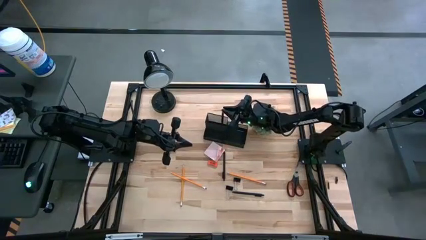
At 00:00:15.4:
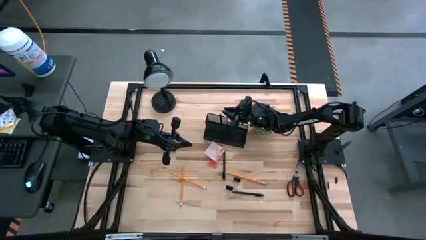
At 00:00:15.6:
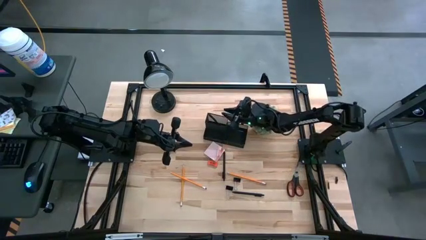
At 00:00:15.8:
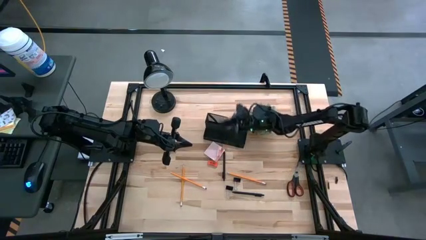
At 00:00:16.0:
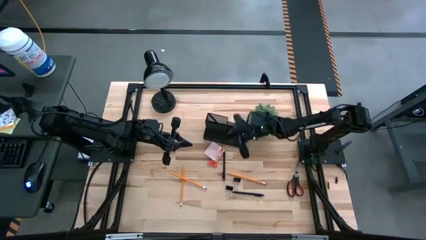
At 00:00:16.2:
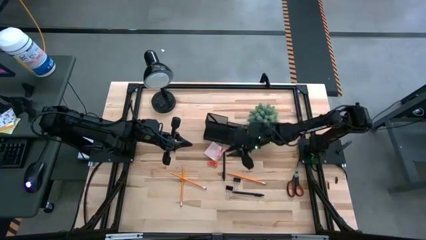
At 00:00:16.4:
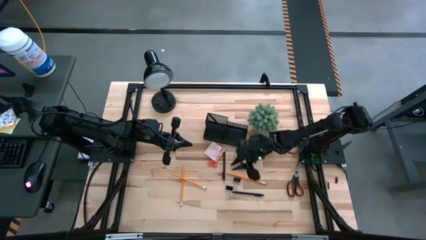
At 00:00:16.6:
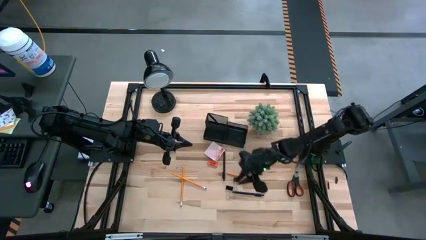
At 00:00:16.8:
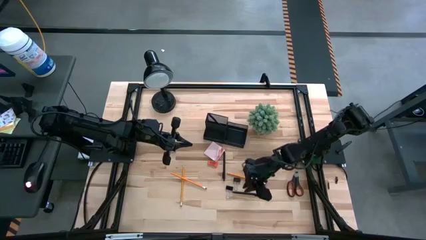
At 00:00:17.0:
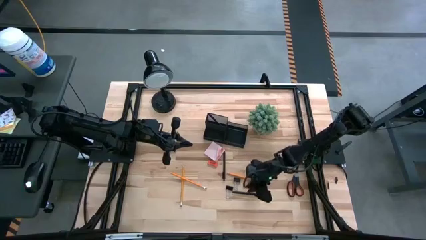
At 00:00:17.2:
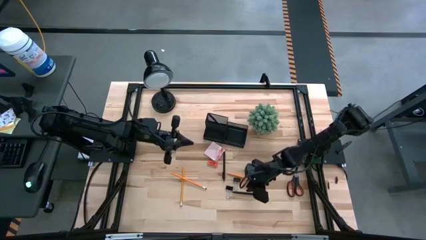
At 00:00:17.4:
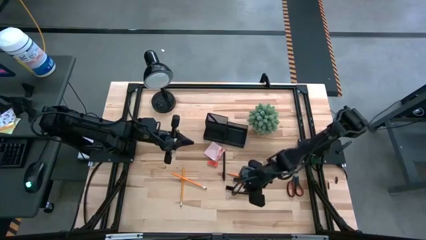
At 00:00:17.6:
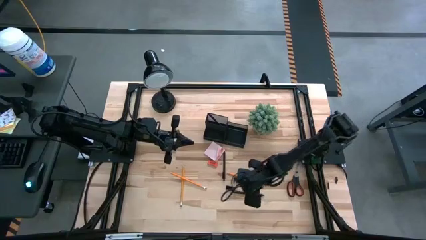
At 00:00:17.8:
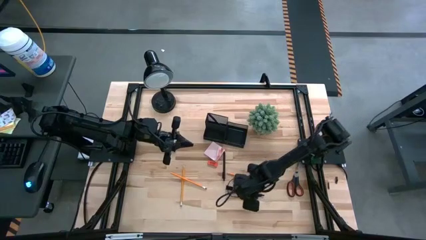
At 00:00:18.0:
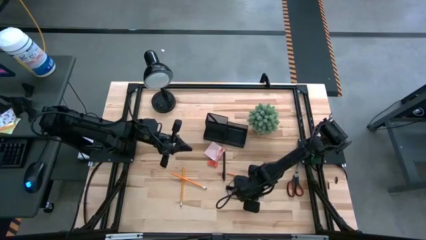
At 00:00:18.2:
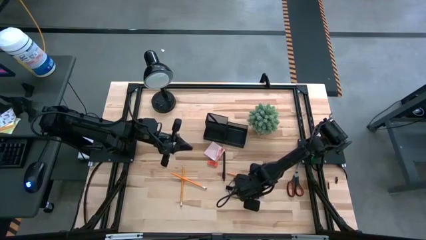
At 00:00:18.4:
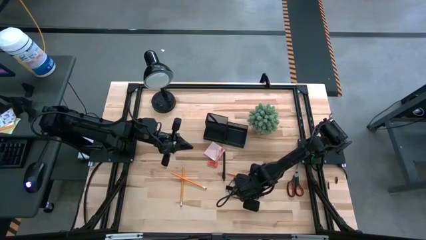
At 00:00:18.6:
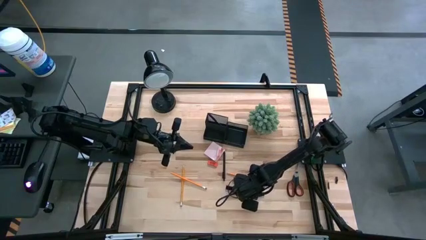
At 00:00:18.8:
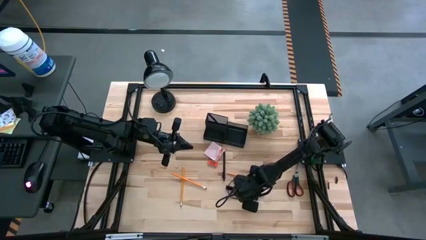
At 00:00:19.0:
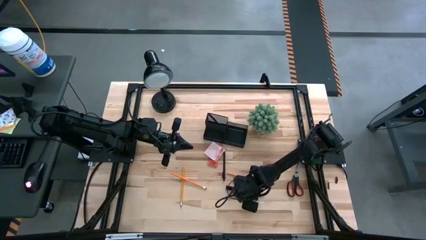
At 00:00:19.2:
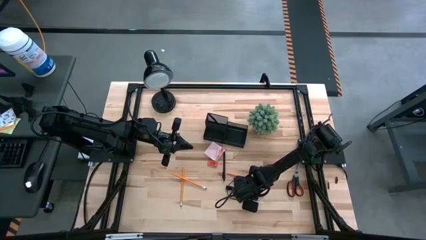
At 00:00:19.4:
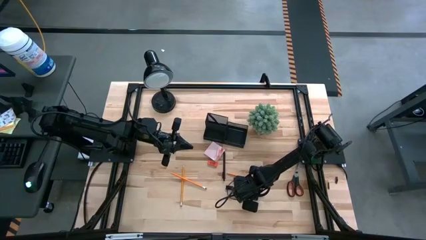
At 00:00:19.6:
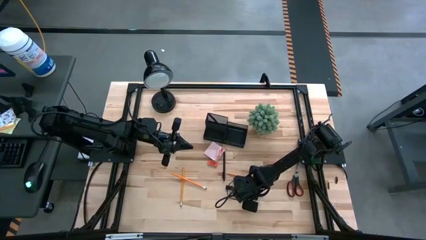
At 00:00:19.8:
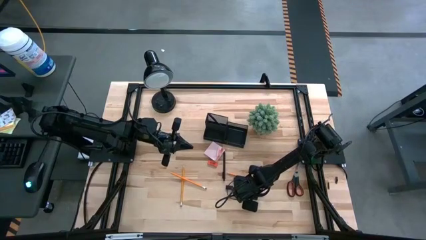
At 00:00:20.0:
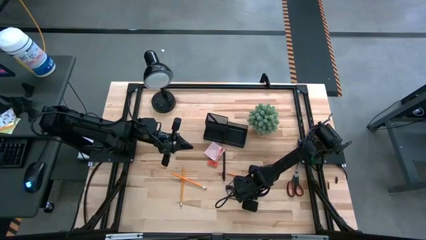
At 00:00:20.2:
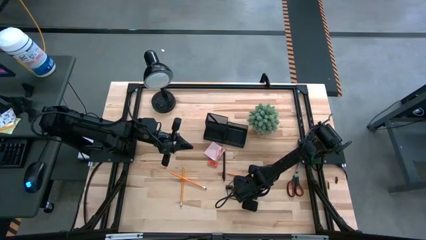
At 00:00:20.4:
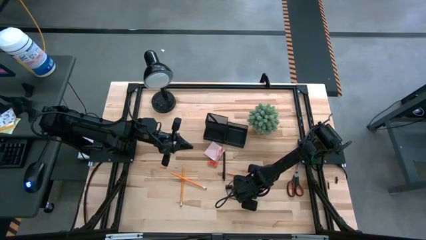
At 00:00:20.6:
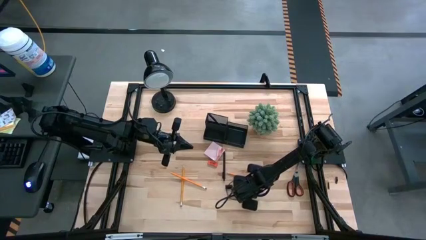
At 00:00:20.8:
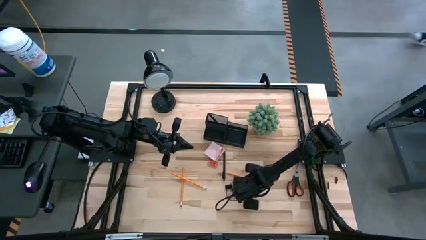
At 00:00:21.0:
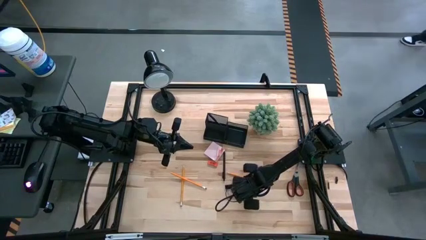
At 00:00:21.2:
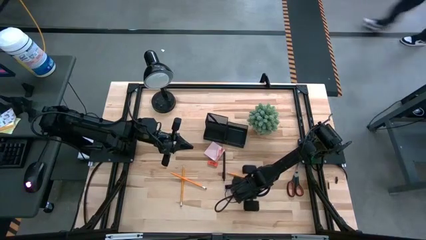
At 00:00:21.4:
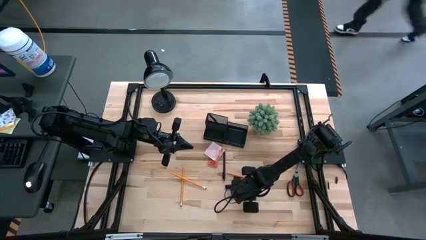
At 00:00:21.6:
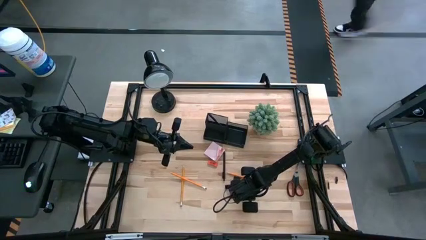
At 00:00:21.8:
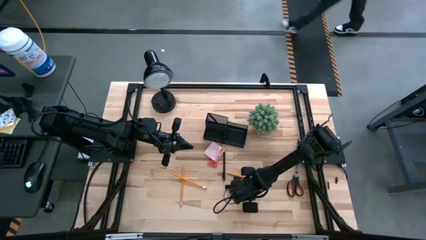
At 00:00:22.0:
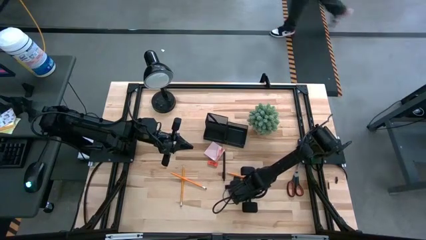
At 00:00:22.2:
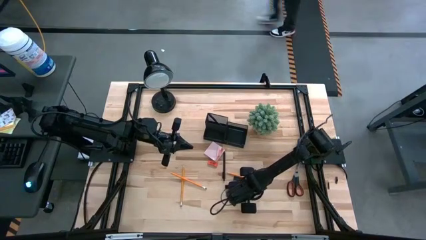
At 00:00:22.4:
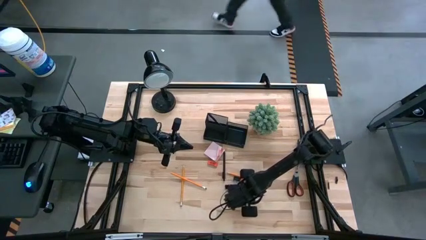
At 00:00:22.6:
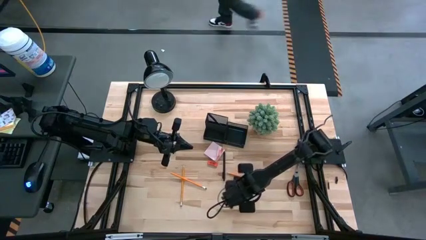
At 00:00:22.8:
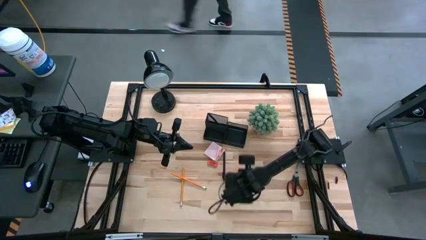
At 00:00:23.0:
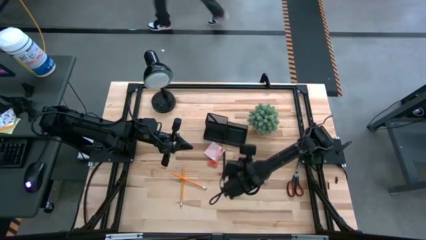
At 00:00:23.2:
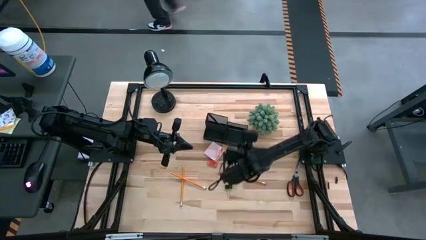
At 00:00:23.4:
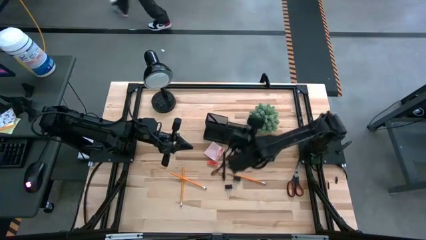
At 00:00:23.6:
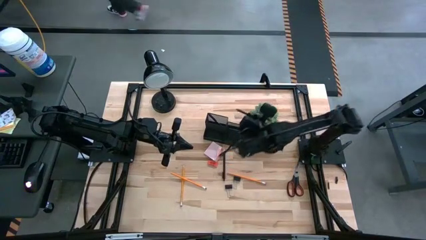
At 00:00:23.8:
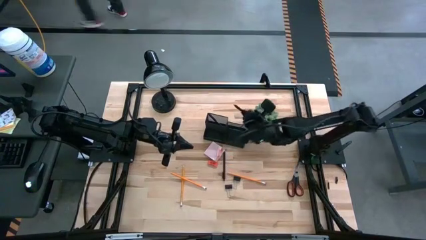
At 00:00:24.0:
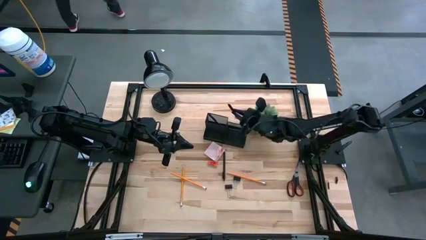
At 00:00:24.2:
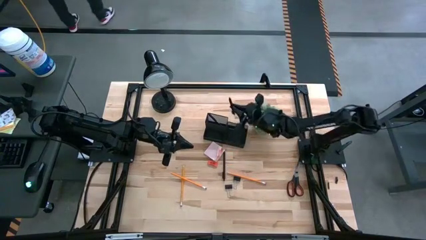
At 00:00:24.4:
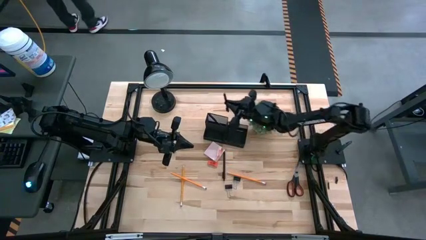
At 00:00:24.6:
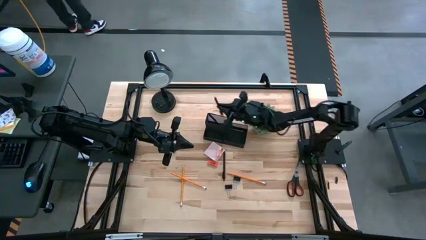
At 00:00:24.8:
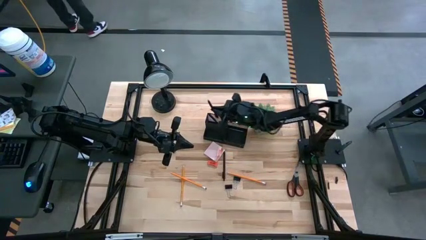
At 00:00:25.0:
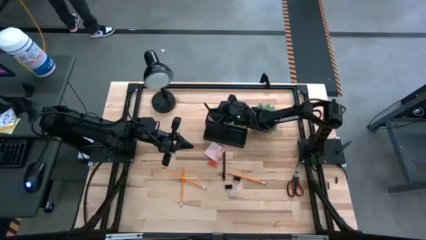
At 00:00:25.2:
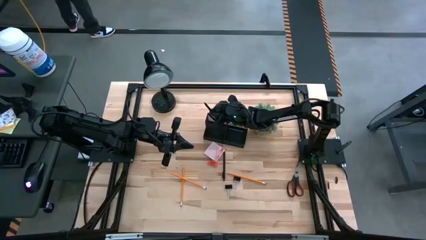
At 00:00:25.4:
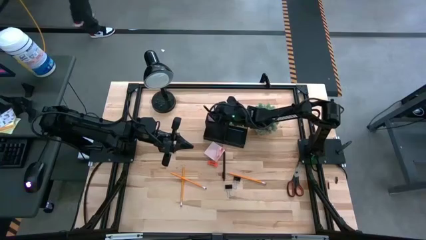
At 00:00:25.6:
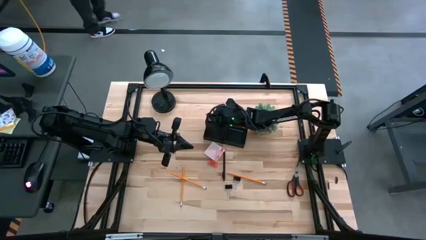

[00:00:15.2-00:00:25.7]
Task: Pick and place office supplies into organizer
Put the bottom black pen into the black desk organizer
